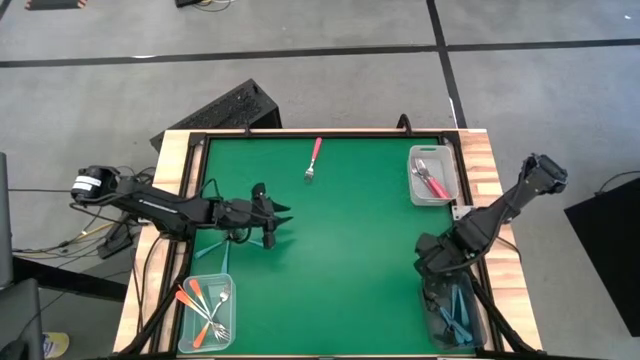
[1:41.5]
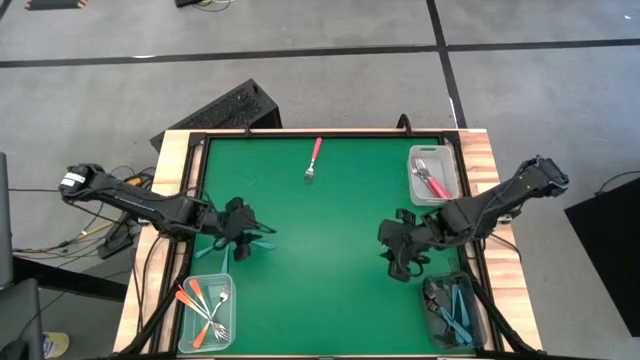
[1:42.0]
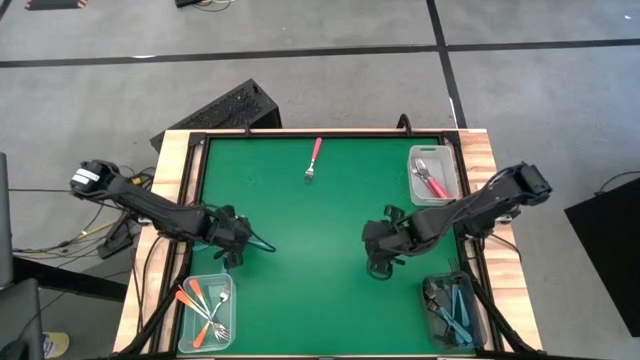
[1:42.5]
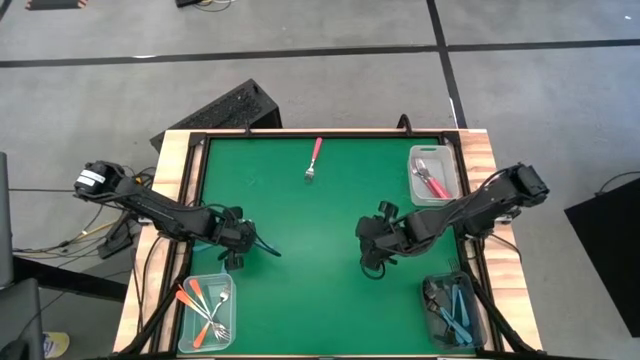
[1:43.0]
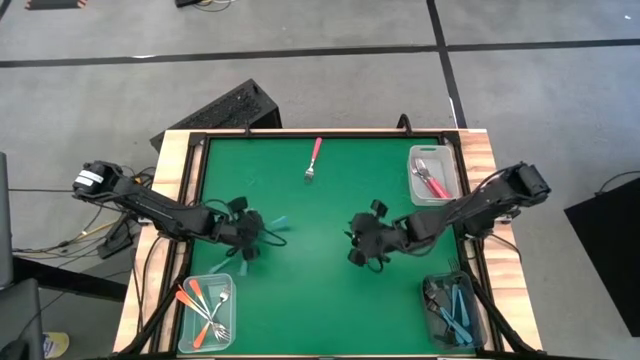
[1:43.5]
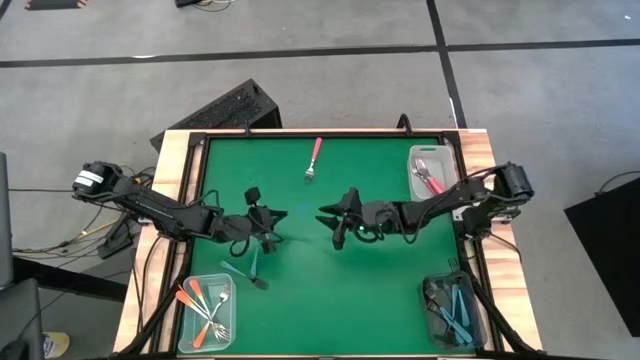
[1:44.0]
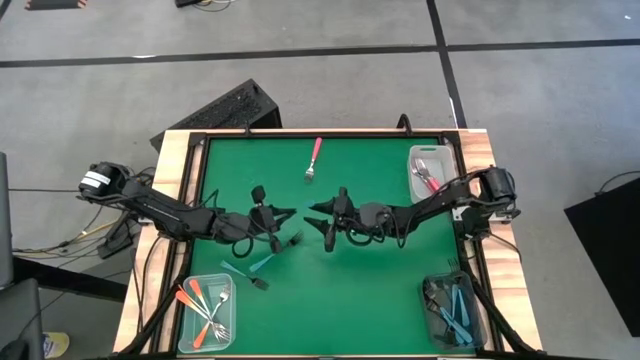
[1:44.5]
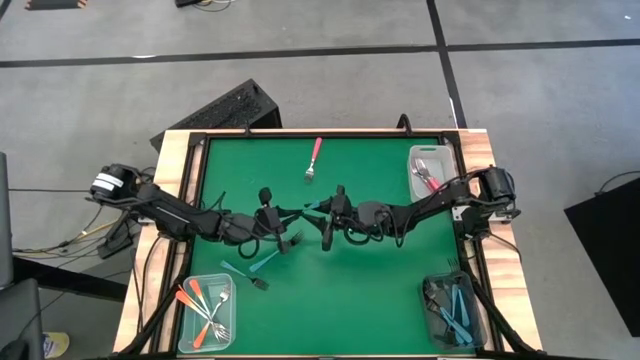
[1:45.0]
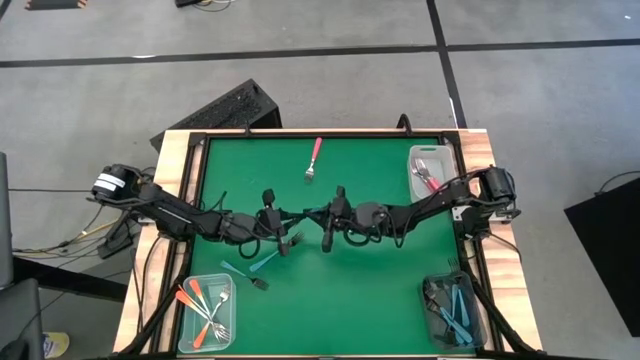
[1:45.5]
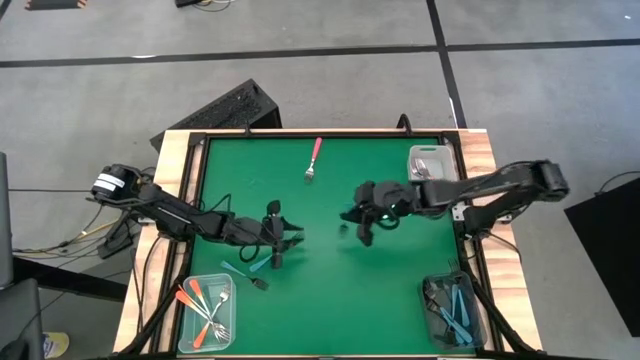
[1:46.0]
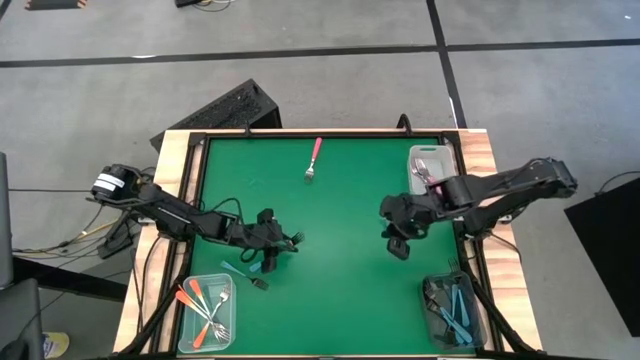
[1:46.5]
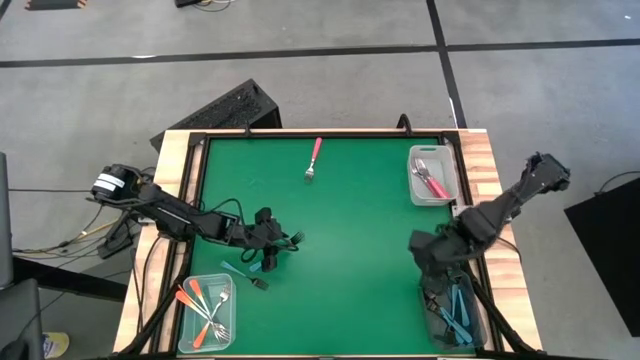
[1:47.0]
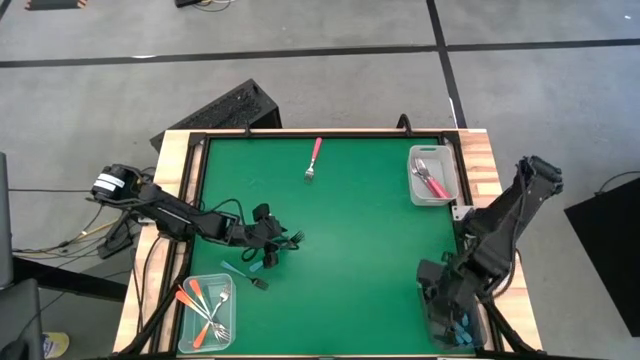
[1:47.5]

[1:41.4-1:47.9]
Task: Sort silverware by color (type)
Put the blue fork into the black bin

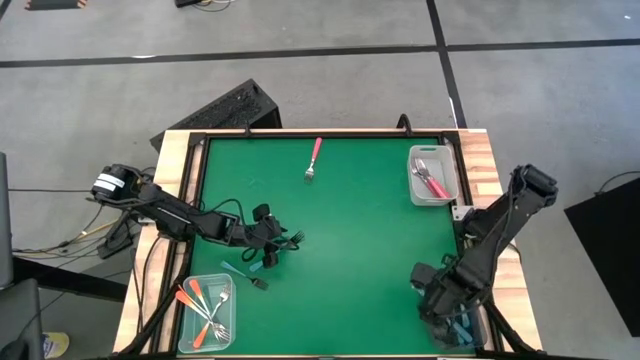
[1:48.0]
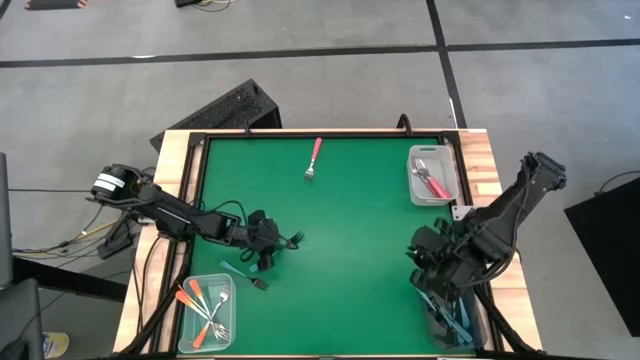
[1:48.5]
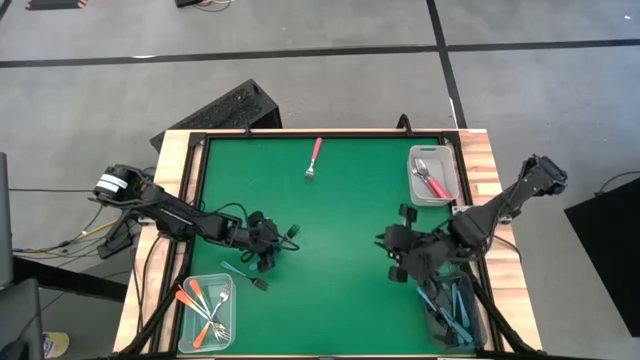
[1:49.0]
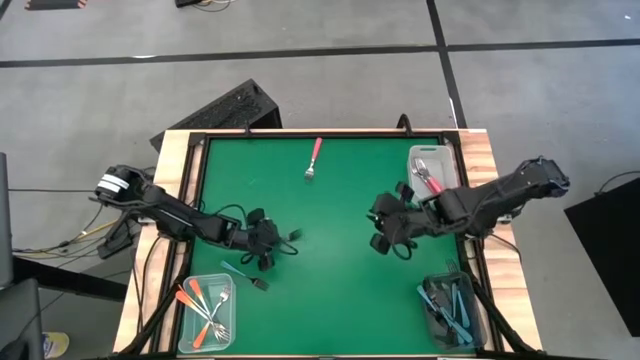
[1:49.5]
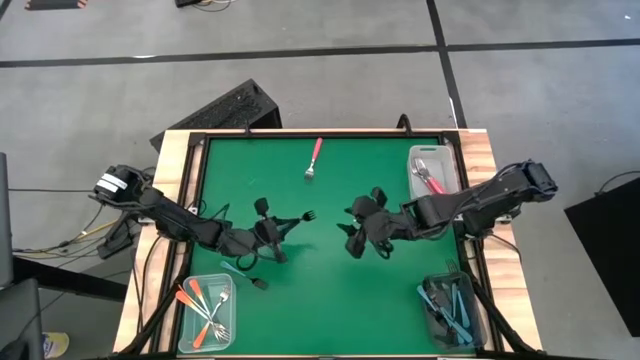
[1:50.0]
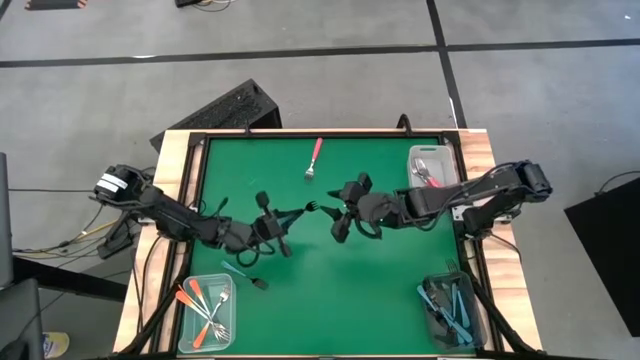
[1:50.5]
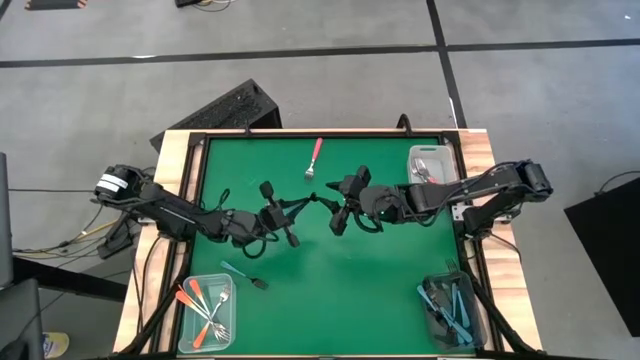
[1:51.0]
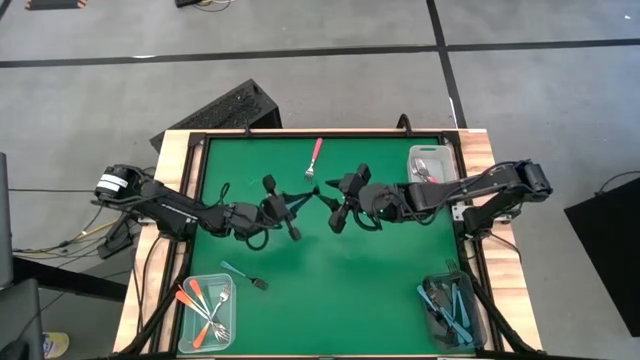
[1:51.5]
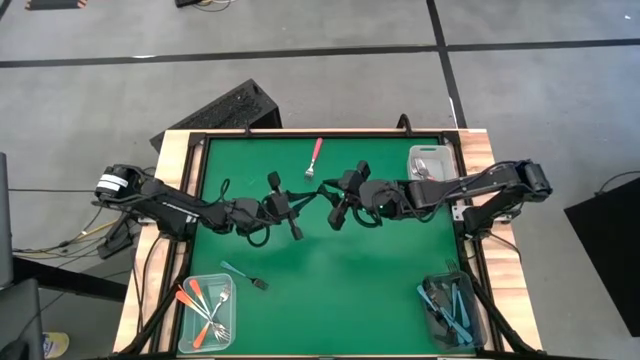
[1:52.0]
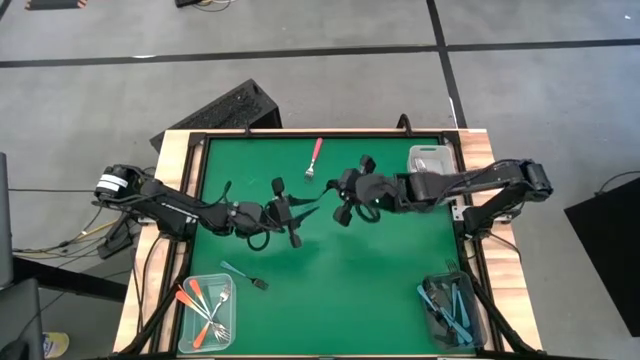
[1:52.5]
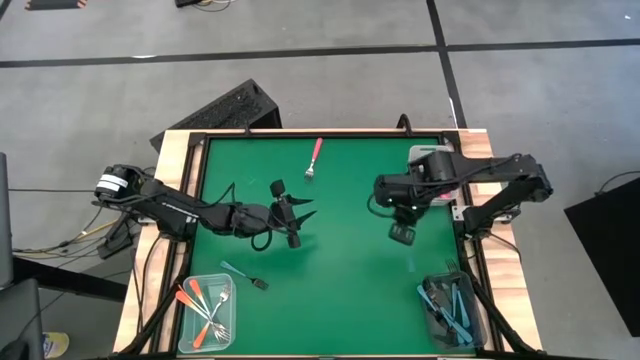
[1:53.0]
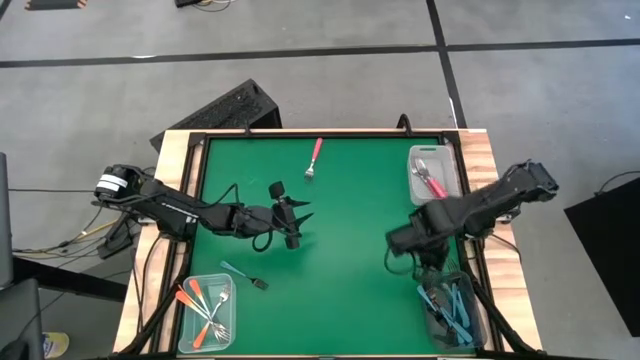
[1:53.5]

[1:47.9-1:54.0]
Put the right blue fork into the black bin

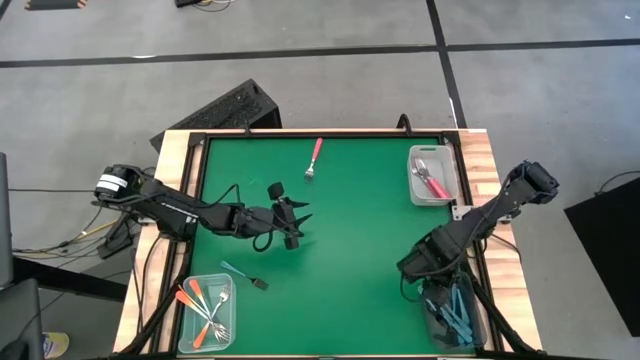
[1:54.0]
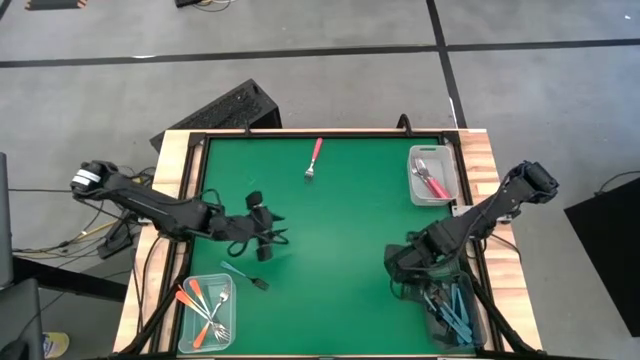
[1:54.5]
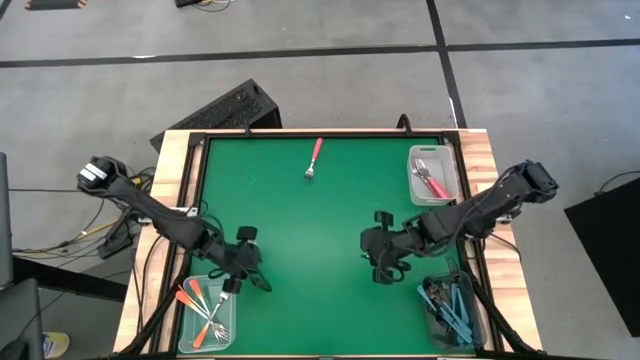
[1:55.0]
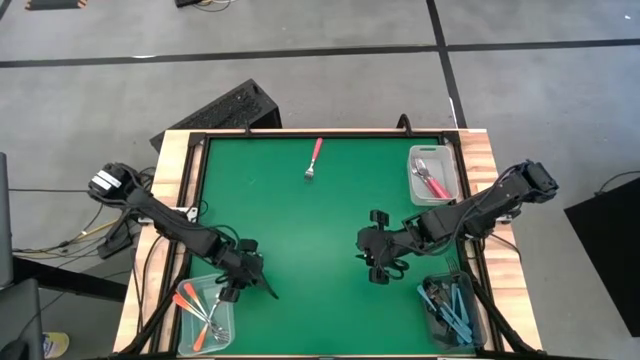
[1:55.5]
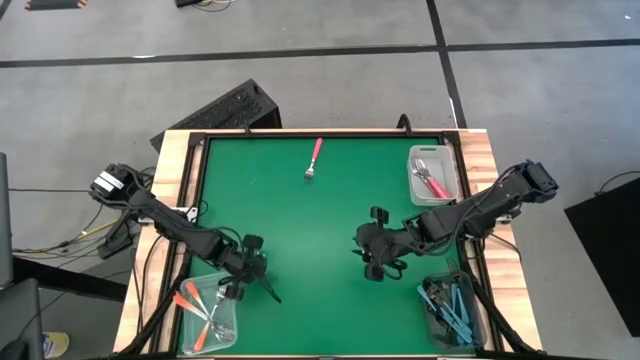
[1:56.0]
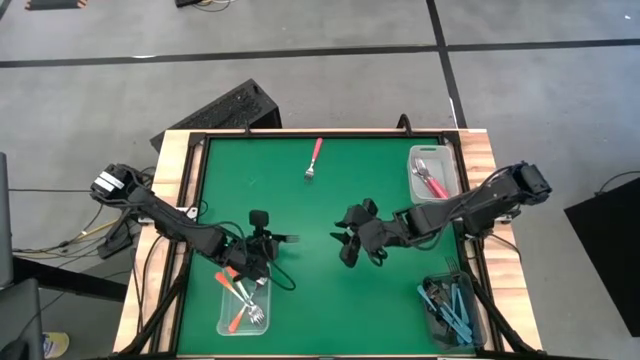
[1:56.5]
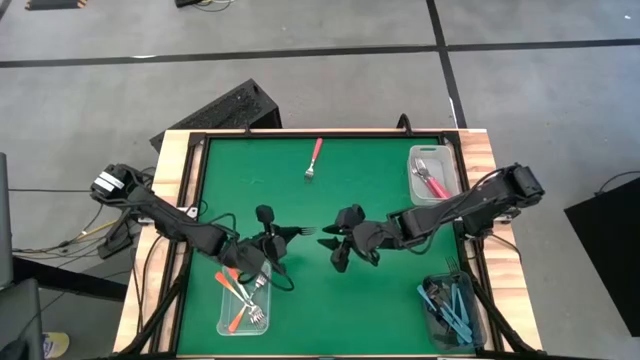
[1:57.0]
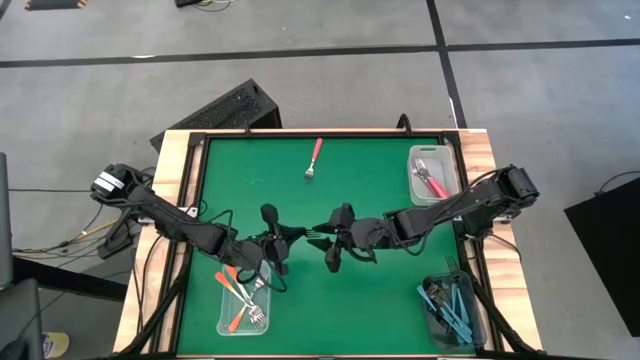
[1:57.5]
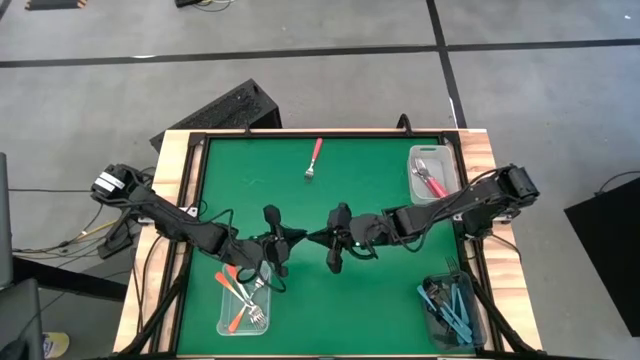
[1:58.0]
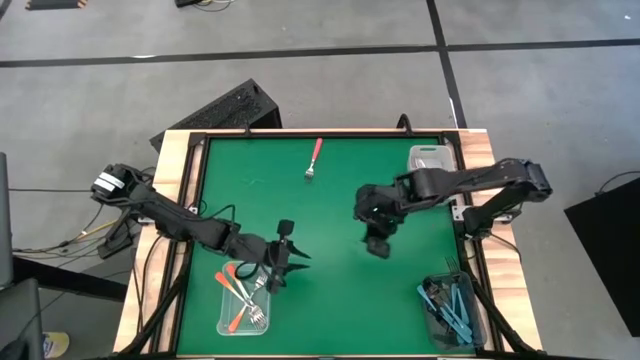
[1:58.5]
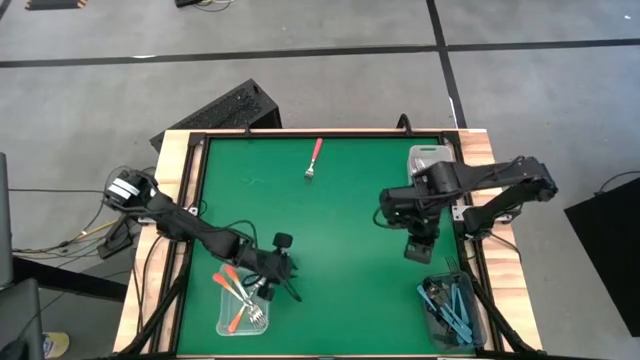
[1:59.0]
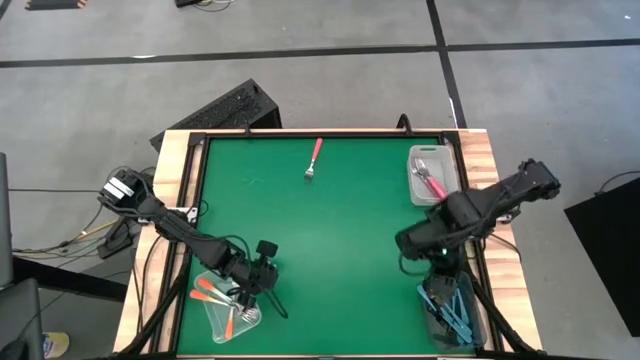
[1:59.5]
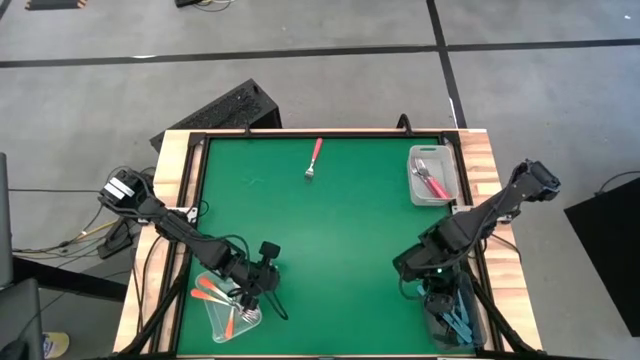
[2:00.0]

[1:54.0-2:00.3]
Put the blue fork into the black bin
